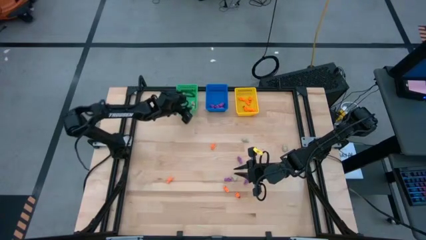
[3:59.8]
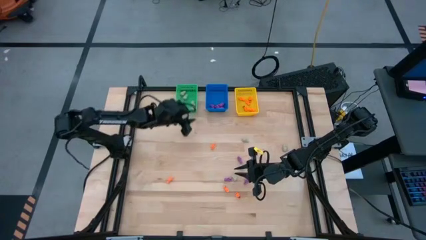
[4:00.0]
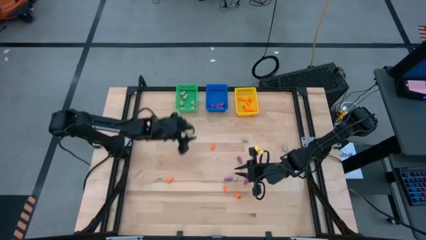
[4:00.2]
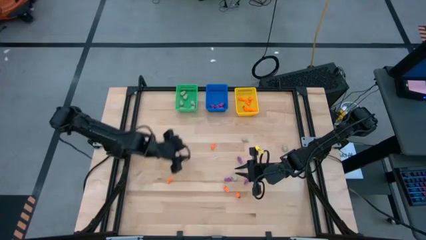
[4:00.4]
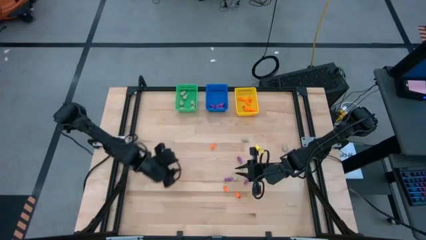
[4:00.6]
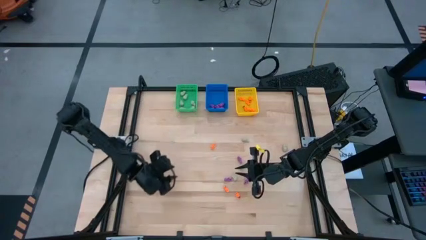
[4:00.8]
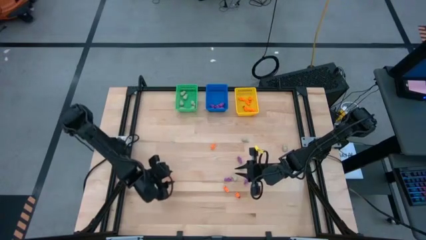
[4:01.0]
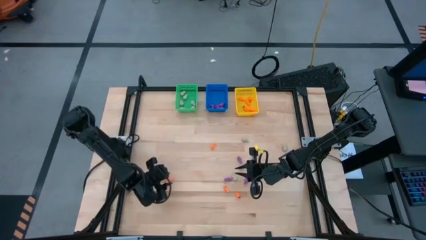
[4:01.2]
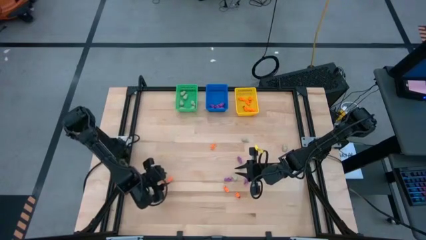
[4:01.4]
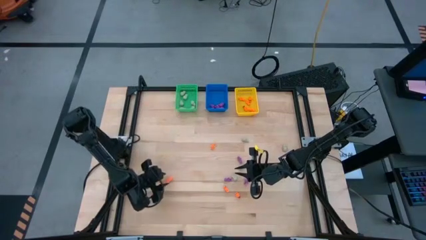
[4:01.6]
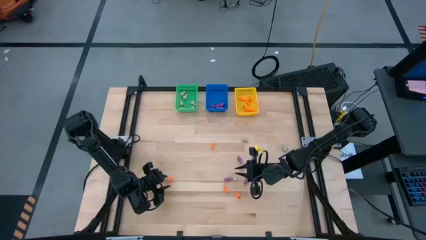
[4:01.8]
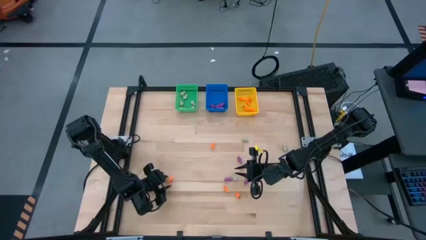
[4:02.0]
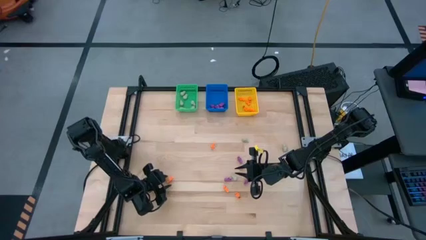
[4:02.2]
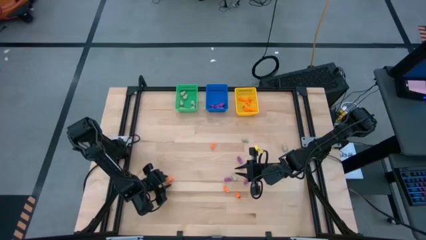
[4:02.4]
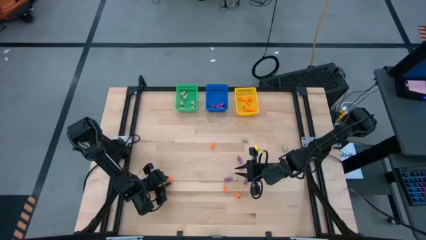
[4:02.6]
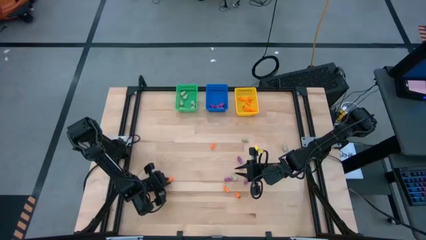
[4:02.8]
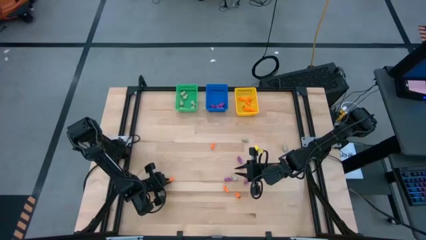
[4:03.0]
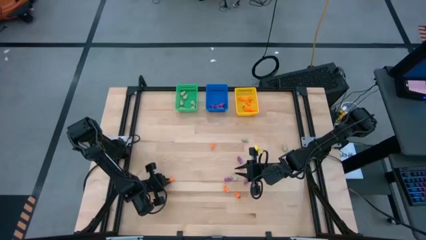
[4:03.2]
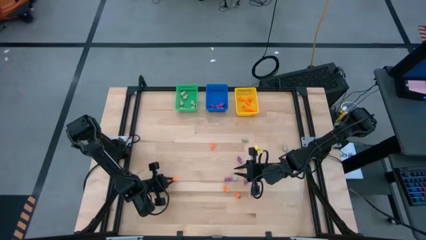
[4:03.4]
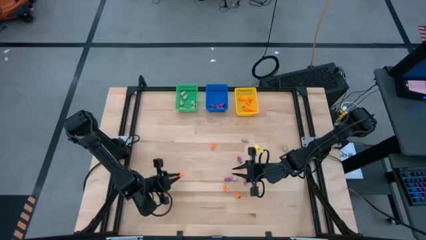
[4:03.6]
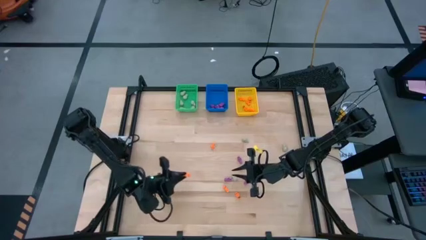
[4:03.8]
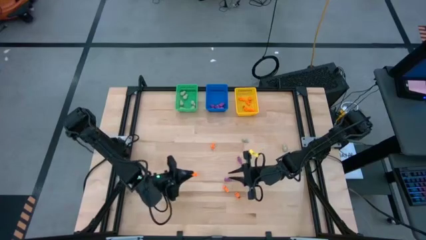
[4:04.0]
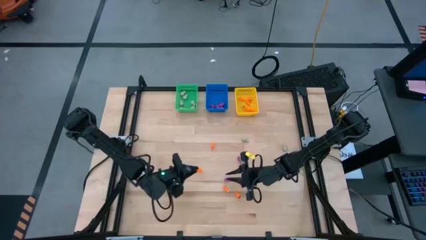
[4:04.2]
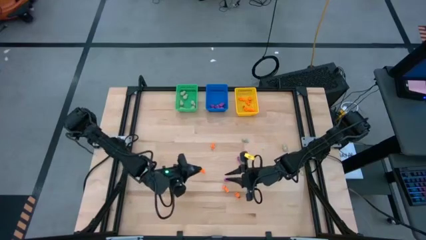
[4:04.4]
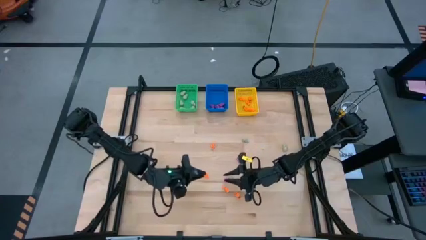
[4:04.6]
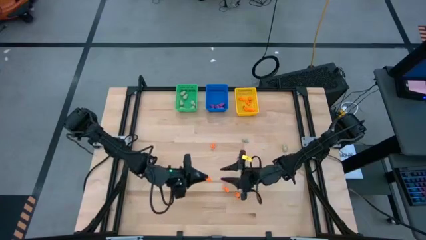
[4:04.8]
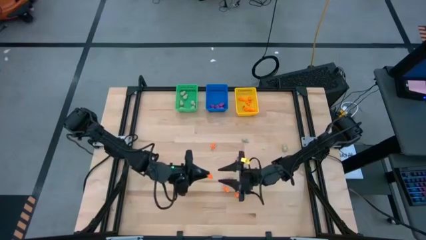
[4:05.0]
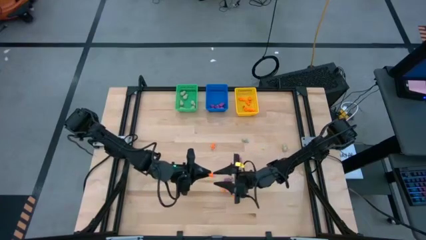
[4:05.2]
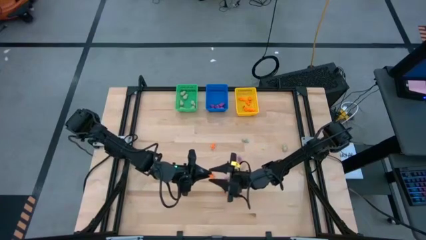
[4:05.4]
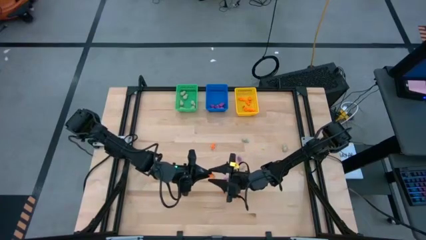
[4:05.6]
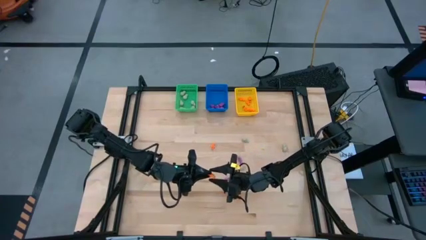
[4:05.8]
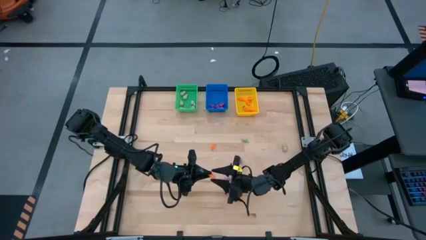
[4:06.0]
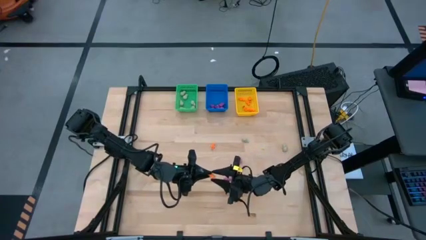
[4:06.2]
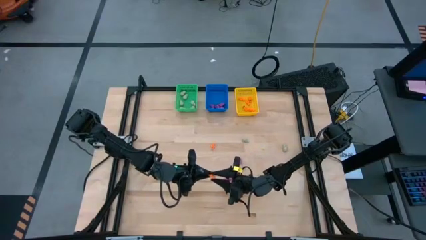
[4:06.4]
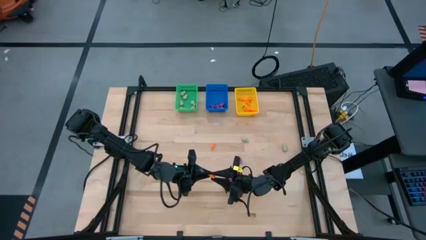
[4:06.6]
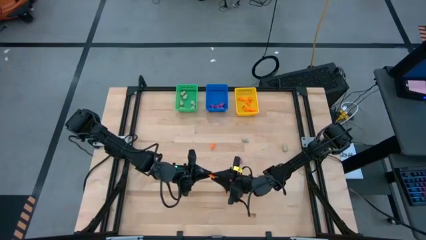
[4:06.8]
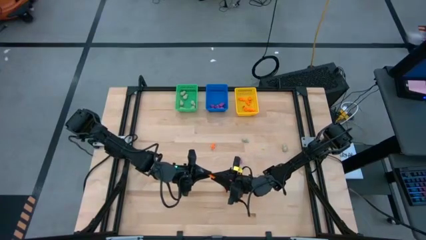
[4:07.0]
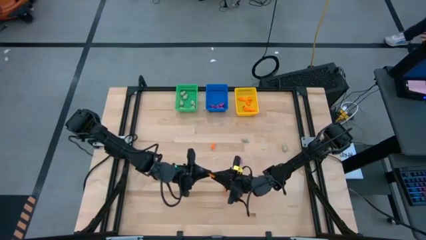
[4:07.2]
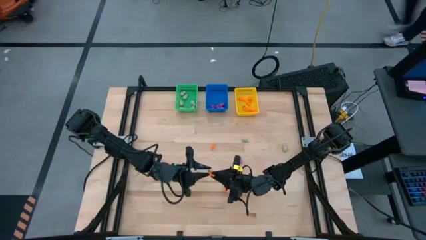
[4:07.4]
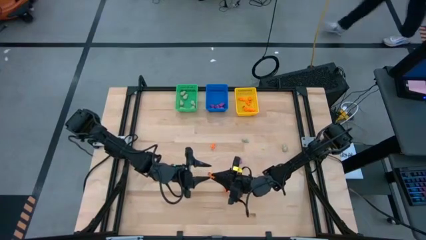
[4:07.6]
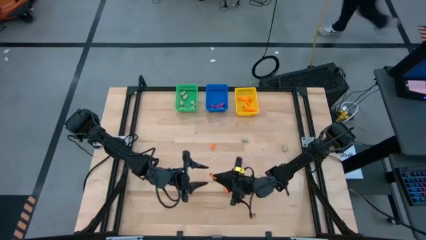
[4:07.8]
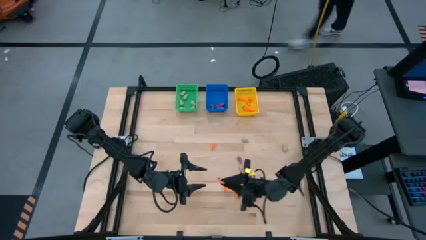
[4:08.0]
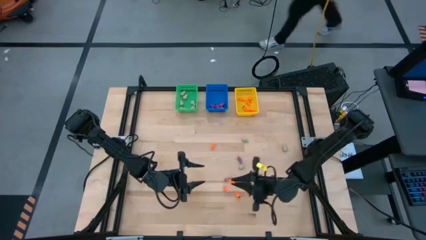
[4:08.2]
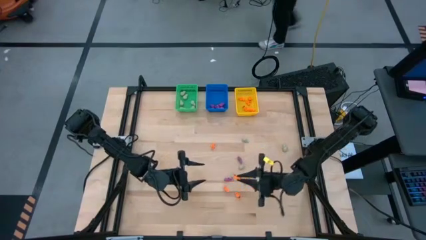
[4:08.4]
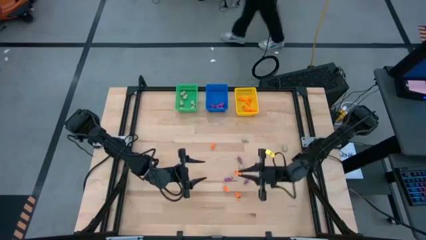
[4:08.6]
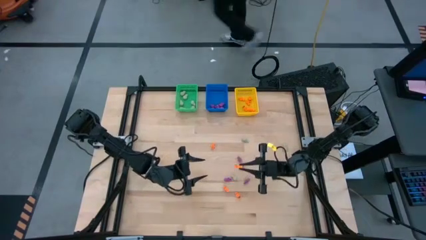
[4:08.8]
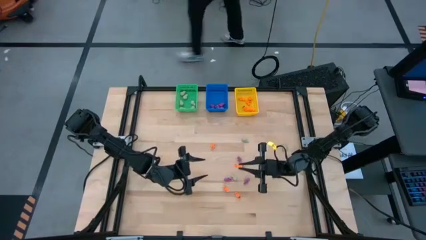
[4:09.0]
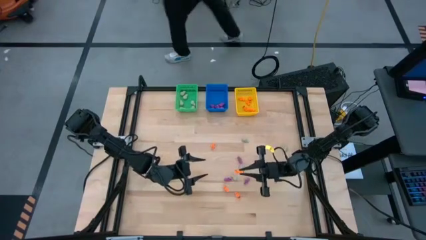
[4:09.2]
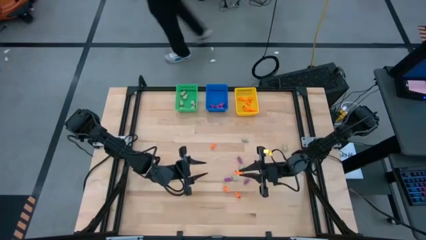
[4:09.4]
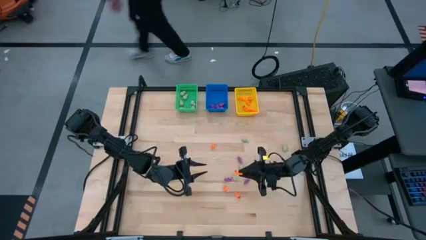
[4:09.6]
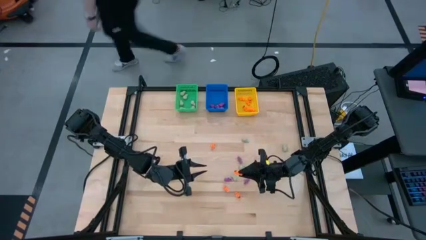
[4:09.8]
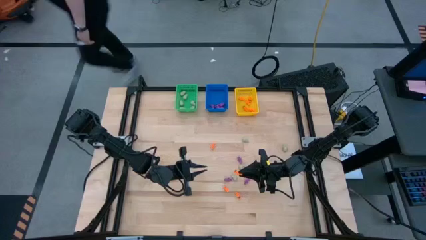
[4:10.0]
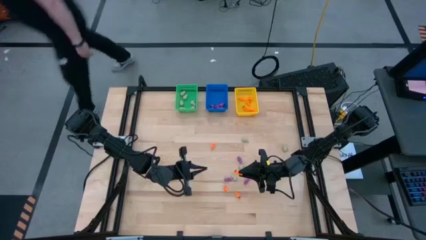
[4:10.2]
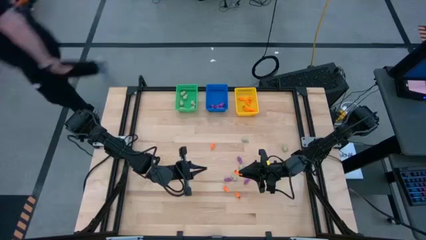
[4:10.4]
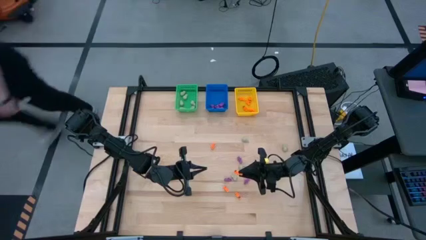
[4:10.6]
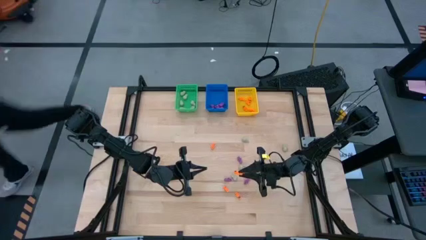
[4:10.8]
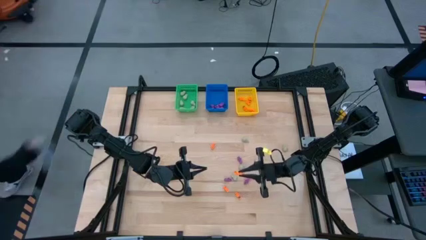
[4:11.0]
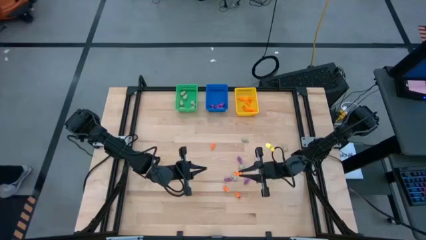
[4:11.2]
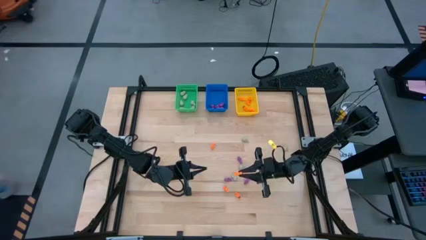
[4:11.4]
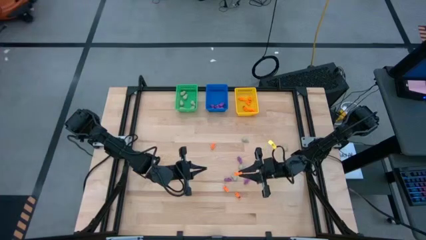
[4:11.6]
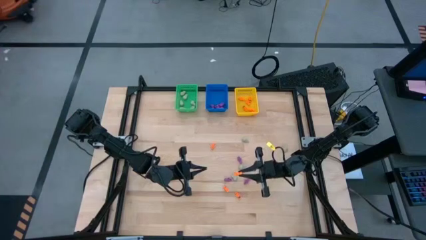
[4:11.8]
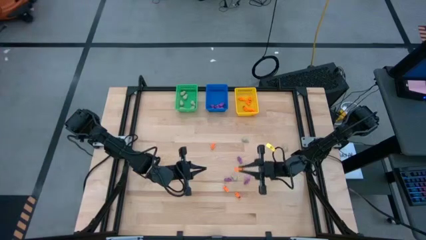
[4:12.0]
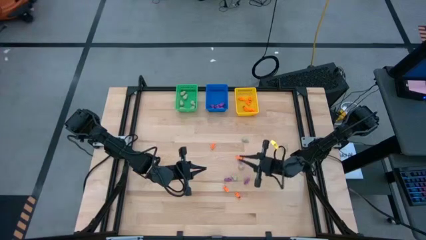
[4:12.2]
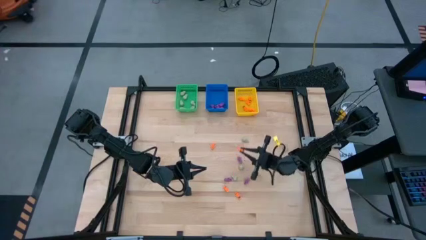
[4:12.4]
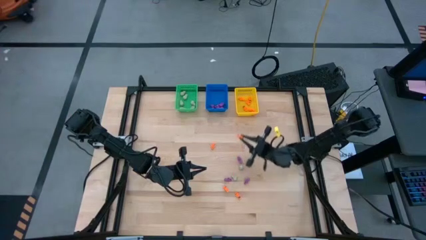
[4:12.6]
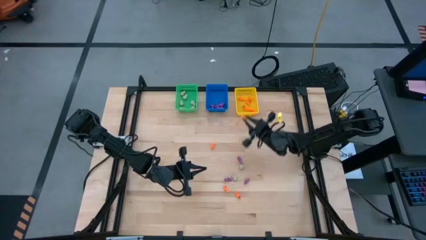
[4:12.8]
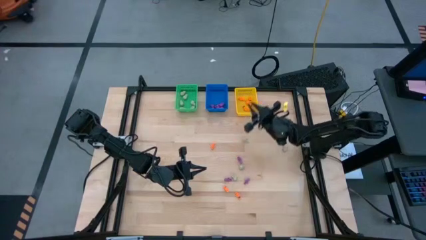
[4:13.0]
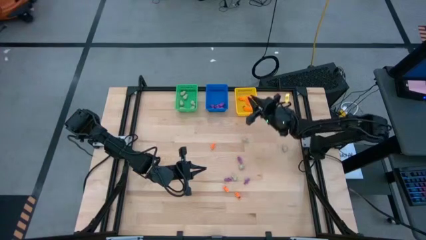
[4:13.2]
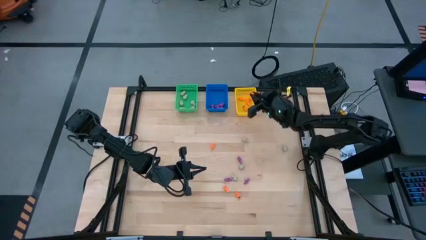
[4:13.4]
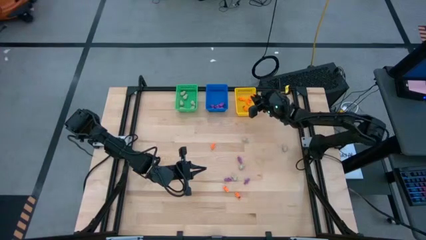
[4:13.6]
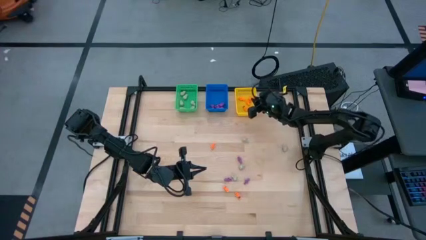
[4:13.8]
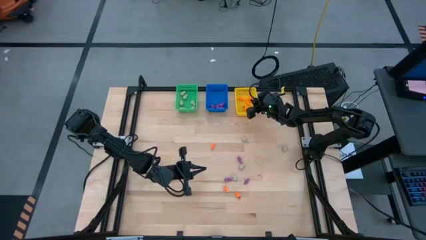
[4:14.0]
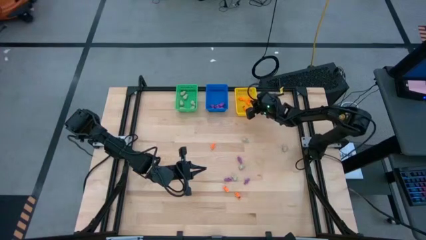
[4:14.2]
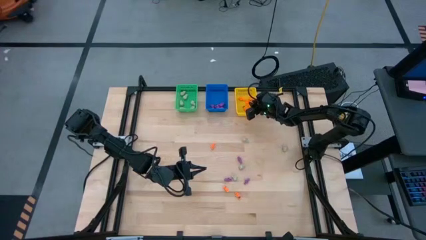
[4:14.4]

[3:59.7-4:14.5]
Task: Sort Halloween decoration
Put the orange skeleton toy into the yellow bin

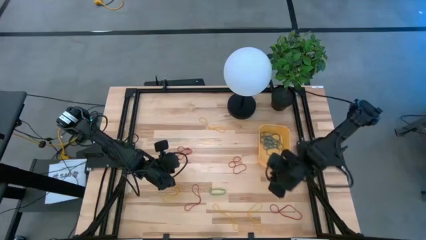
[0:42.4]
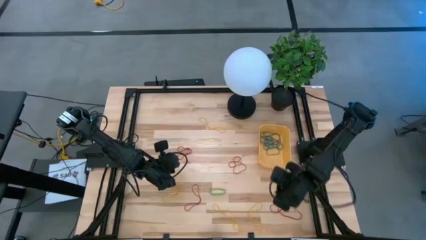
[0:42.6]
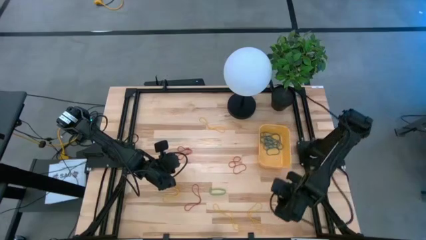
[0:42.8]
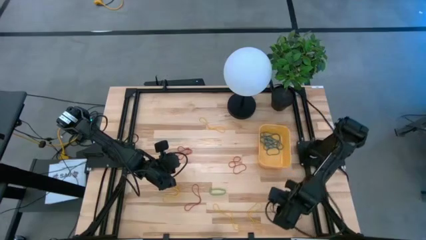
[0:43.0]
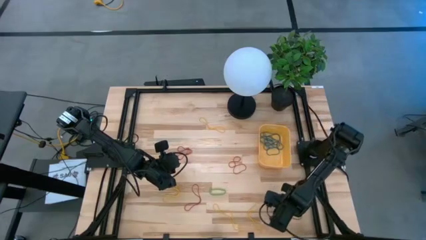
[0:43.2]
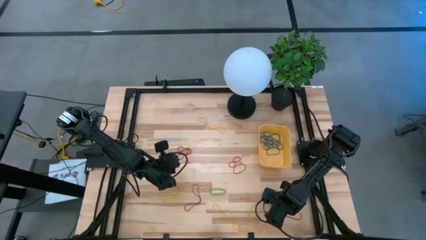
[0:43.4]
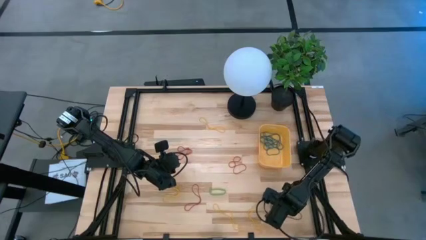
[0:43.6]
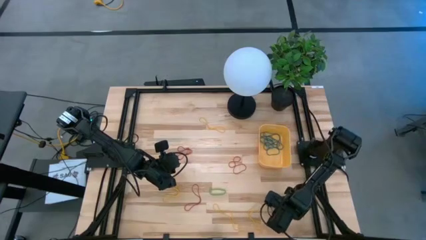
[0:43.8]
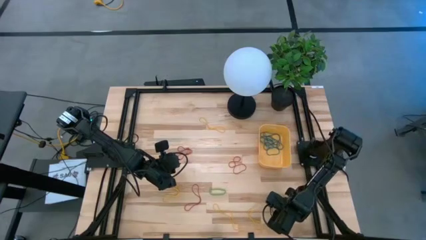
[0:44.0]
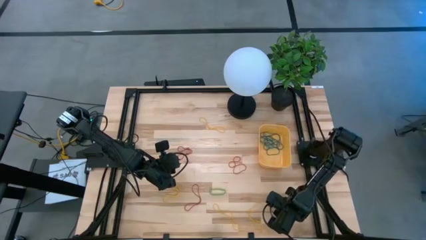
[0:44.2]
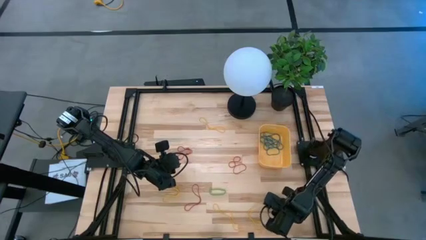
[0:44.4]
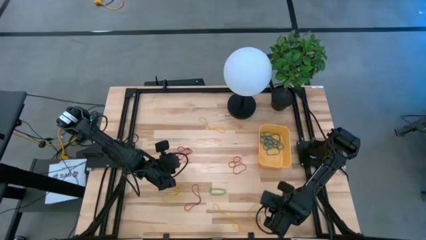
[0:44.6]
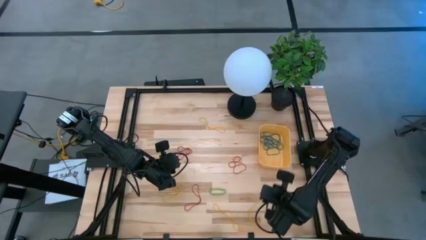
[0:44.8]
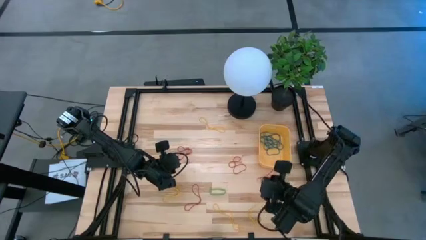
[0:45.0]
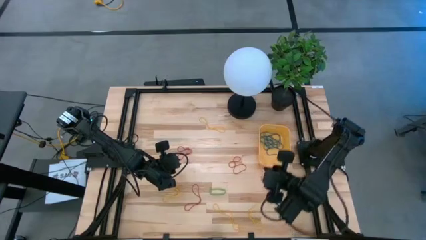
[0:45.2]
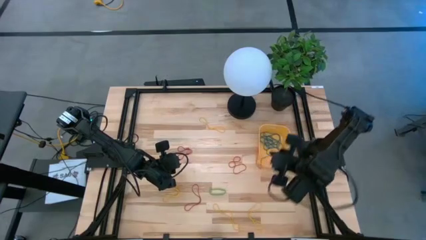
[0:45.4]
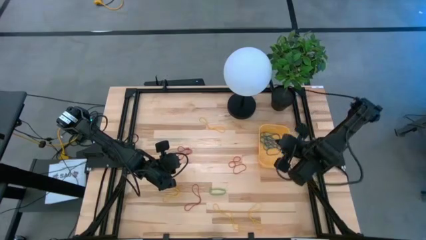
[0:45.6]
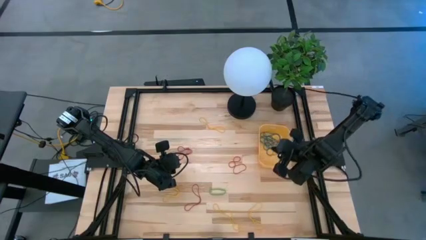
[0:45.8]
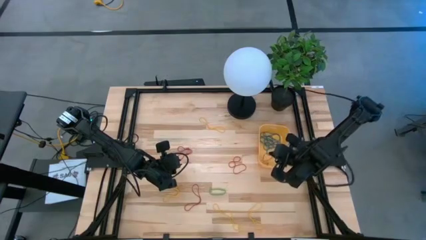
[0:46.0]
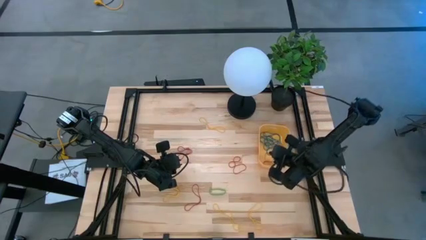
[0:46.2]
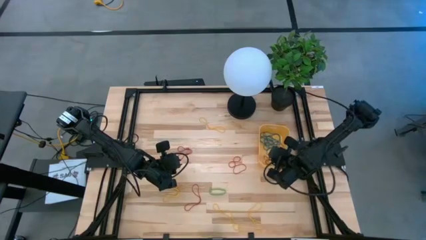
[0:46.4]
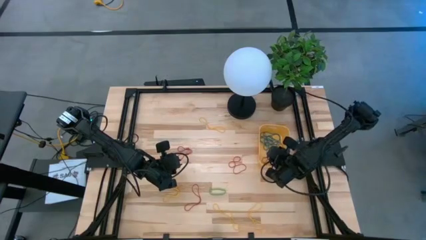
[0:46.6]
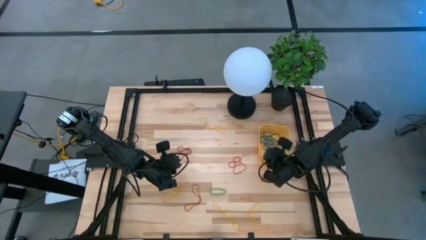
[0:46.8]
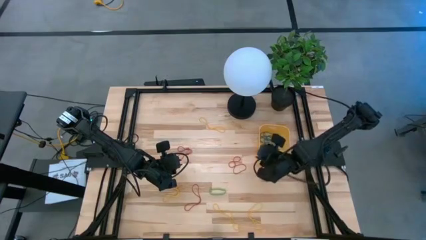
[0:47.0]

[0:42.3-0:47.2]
Task: Pick and place items into bin
Put the red rubber band into the bin
